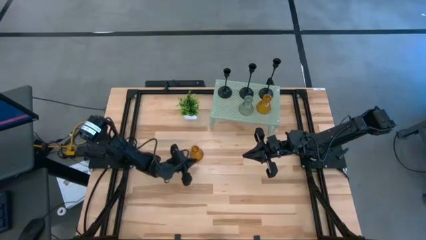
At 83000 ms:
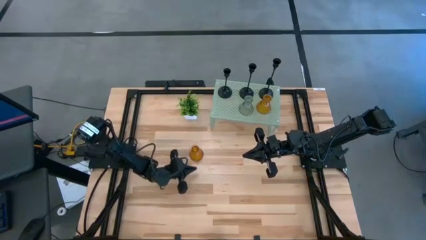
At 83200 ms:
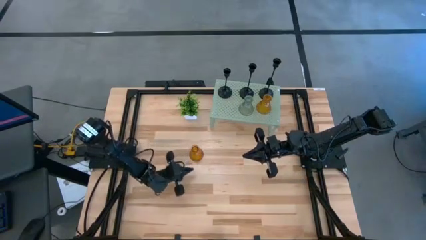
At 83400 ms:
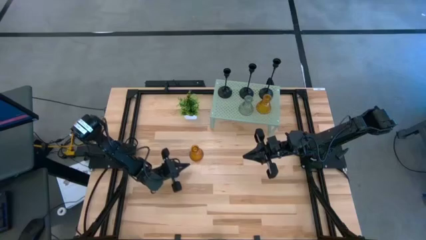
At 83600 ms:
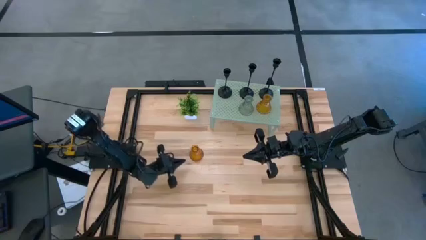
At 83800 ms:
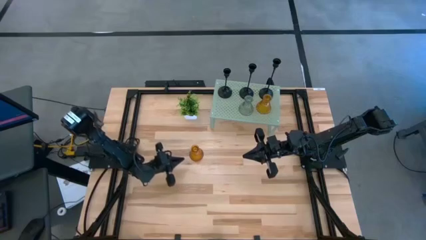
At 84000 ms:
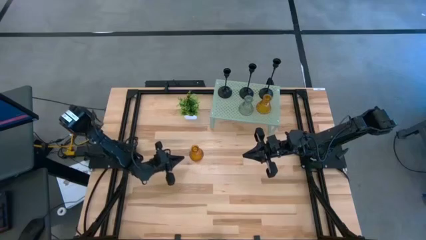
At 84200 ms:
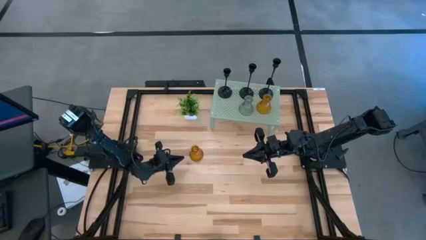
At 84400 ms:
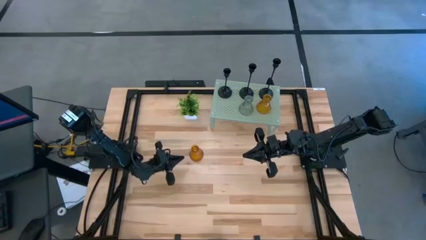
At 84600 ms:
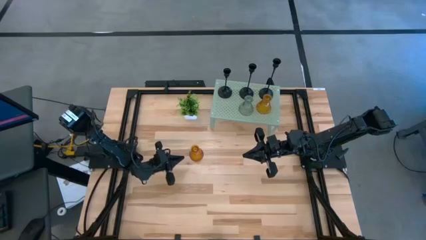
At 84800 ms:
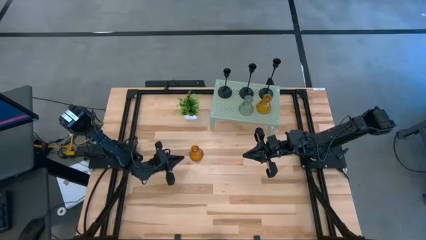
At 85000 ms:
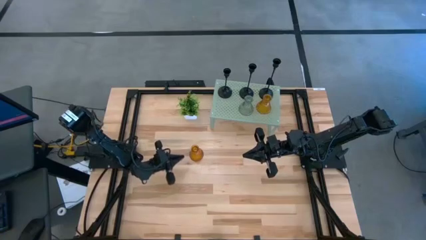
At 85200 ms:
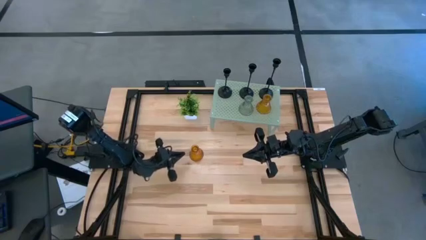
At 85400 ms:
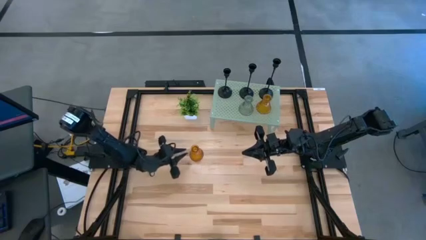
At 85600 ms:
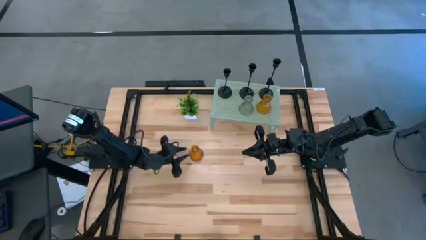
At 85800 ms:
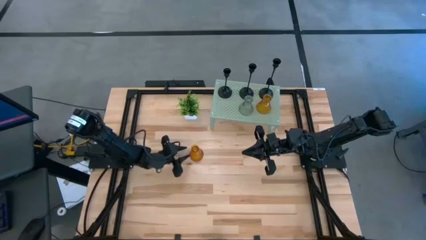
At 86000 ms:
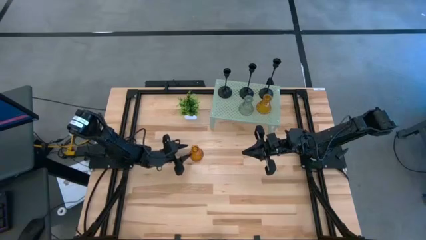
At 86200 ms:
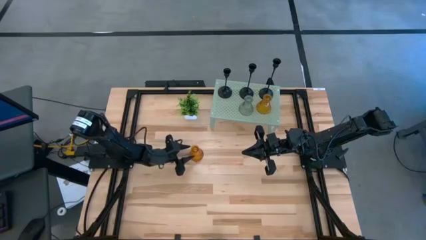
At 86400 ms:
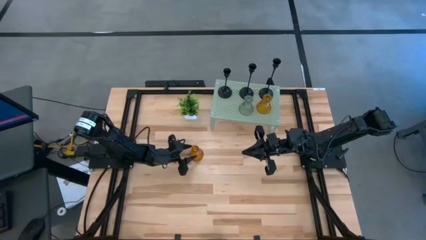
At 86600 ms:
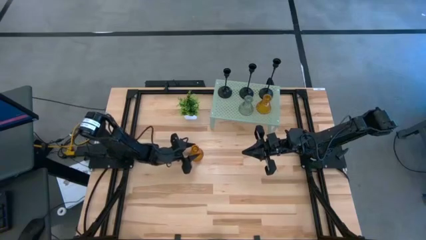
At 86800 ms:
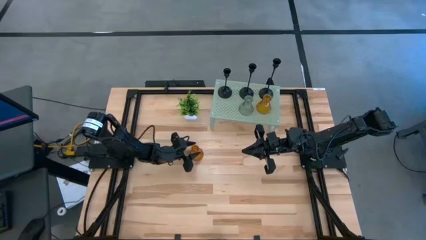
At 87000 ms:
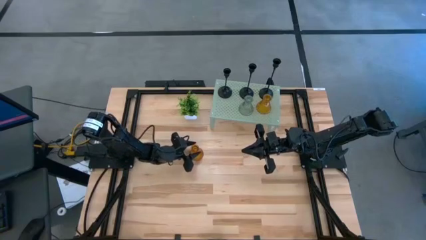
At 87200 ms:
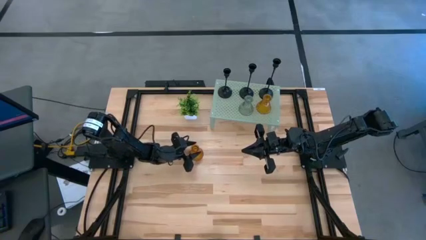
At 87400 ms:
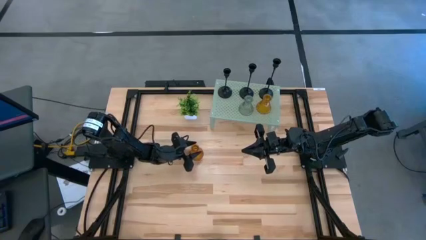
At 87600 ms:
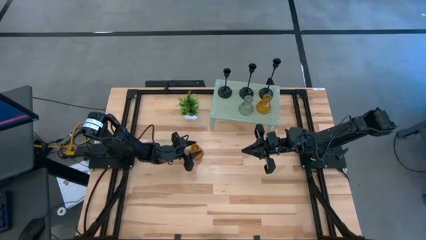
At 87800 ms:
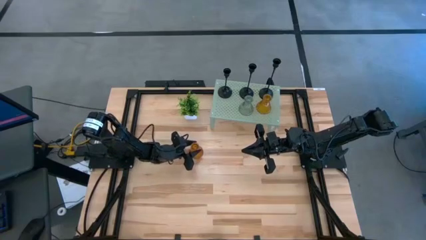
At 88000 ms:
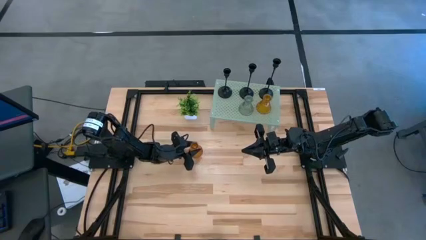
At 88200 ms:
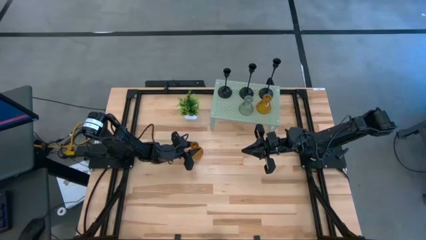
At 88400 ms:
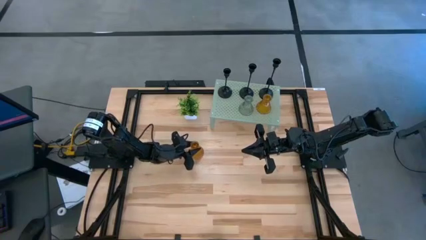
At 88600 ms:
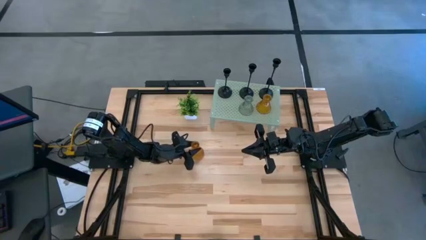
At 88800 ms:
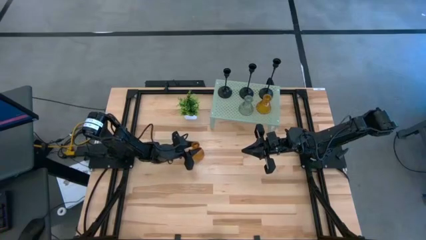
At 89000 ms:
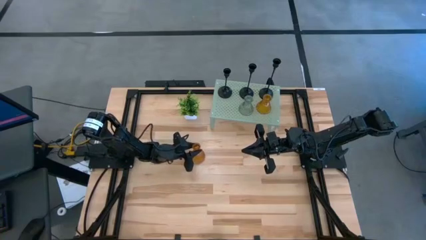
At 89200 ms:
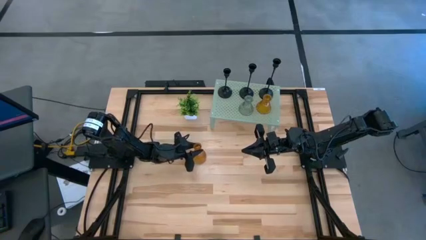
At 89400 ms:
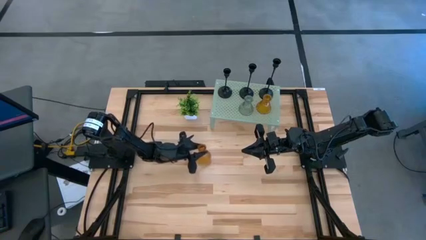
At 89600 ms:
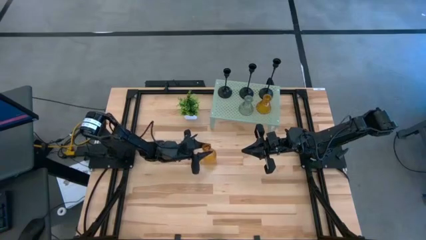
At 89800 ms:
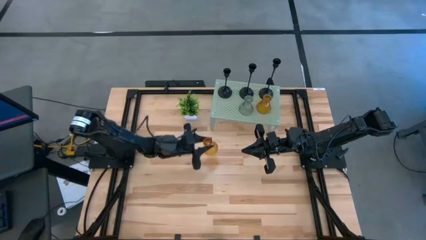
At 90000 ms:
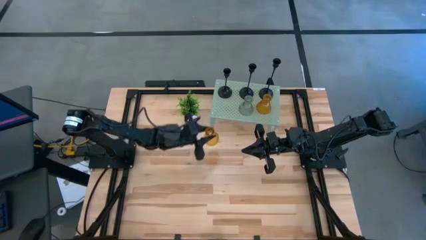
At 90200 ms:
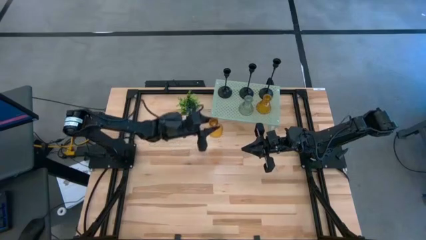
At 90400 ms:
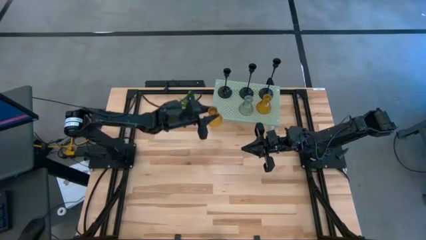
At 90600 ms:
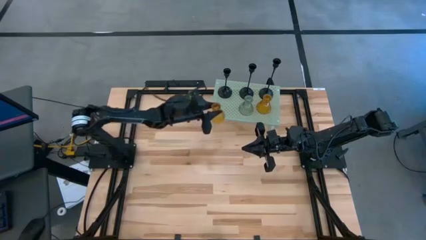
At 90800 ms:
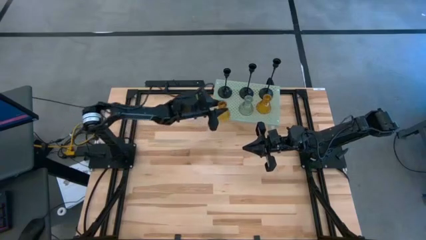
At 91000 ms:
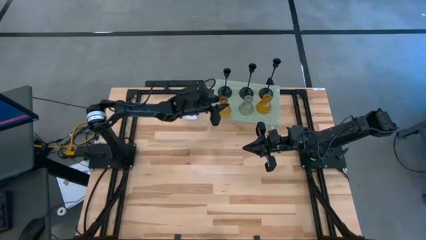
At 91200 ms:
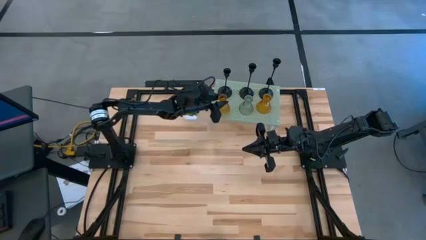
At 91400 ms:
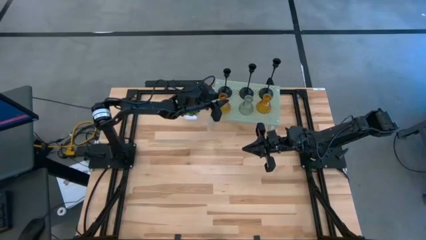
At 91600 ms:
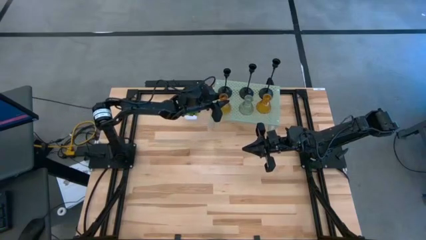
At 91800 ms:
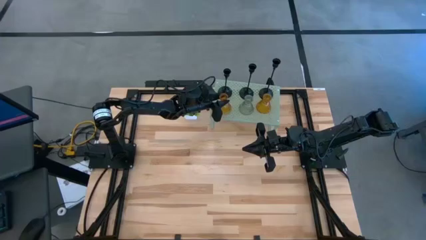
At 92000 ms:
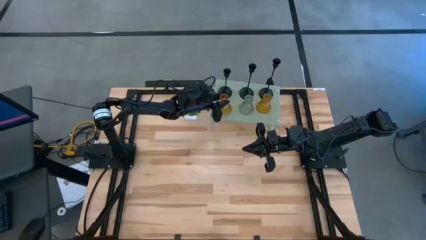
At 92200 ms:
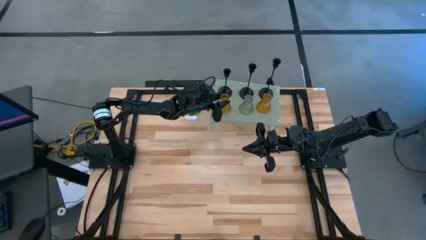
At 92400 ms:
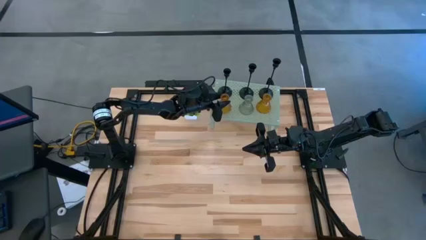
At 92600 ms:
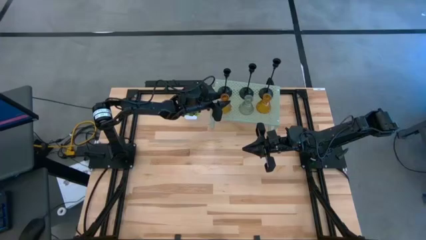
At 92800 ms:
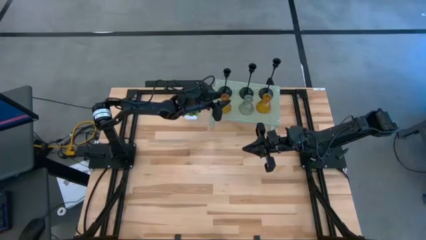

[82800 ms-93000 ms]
Task: Pick & Place candle stick holders
Put the gold glass candle holder on the shelf

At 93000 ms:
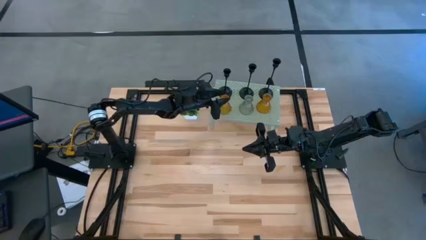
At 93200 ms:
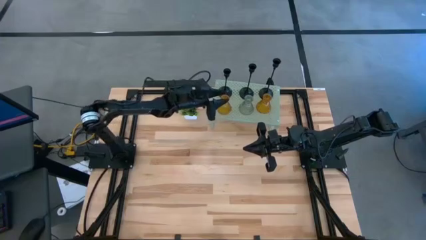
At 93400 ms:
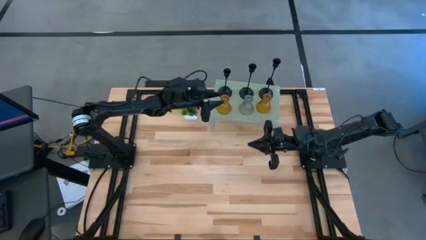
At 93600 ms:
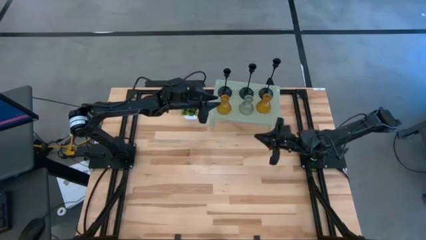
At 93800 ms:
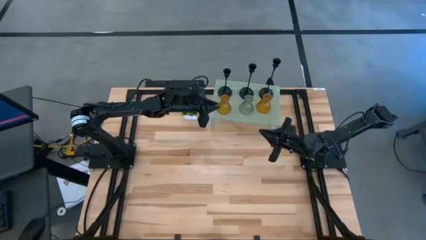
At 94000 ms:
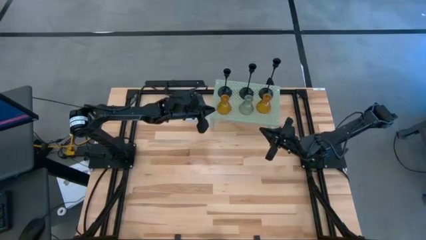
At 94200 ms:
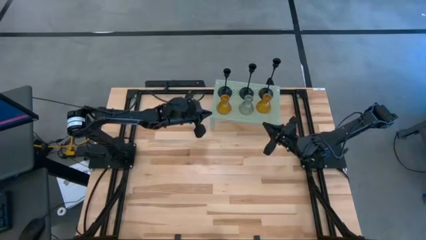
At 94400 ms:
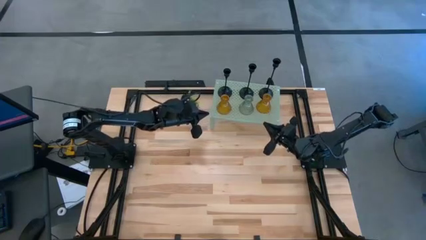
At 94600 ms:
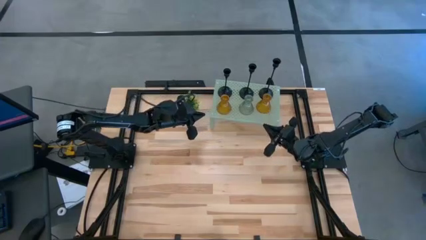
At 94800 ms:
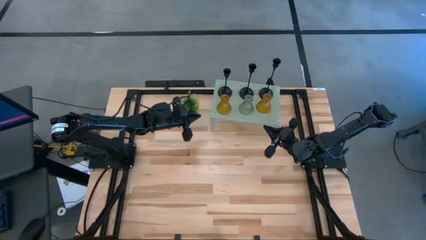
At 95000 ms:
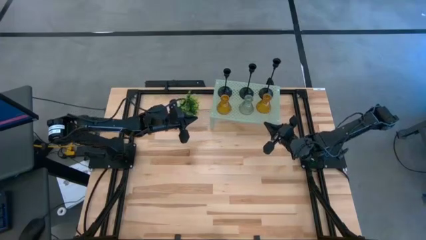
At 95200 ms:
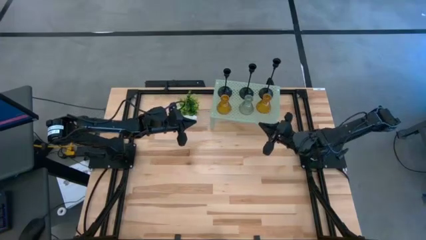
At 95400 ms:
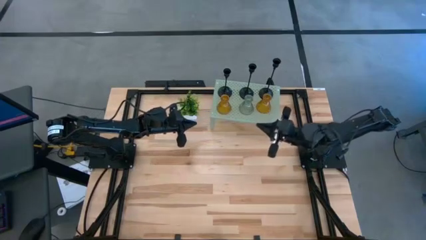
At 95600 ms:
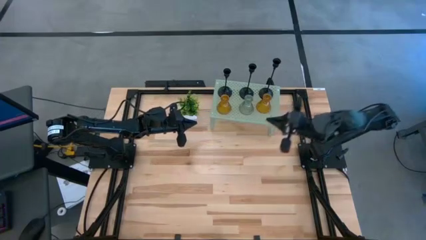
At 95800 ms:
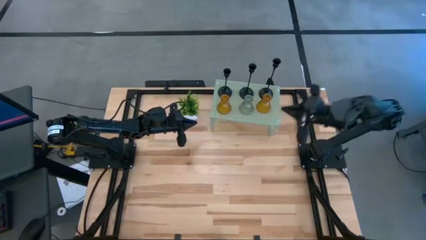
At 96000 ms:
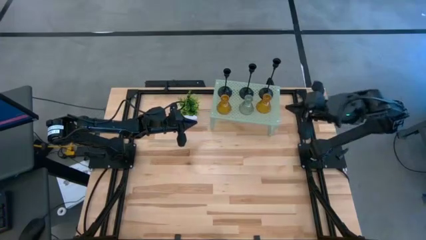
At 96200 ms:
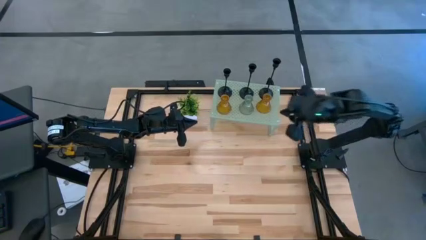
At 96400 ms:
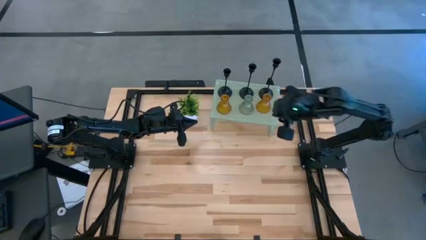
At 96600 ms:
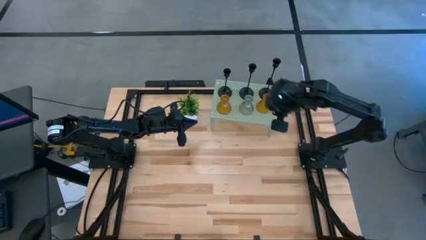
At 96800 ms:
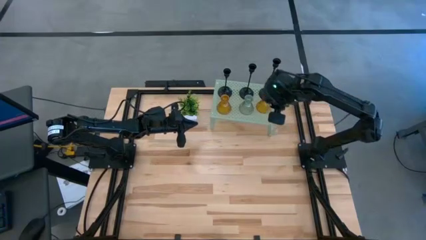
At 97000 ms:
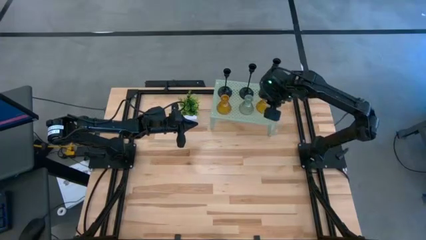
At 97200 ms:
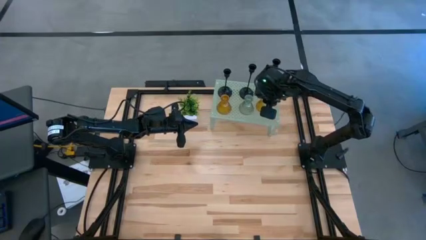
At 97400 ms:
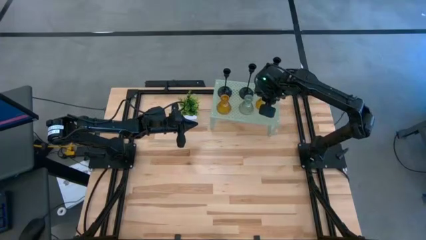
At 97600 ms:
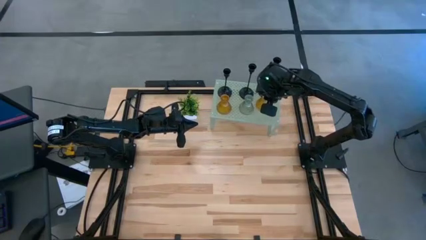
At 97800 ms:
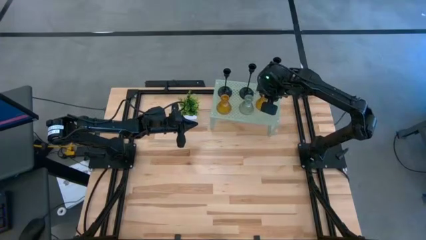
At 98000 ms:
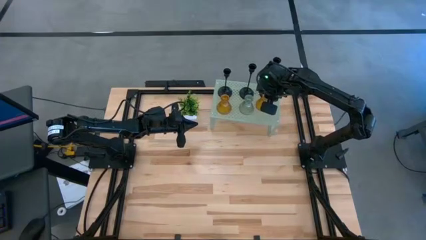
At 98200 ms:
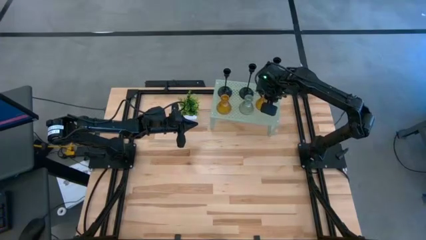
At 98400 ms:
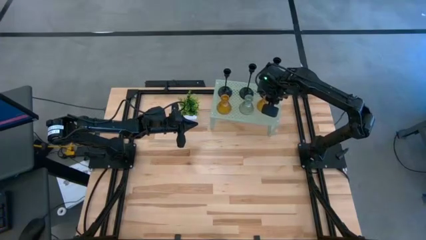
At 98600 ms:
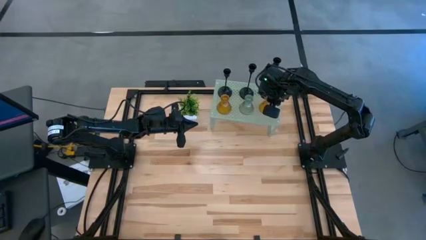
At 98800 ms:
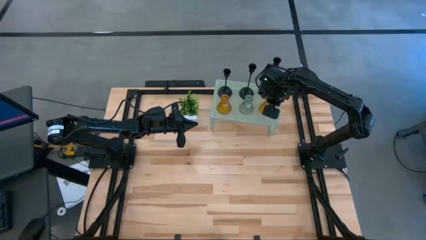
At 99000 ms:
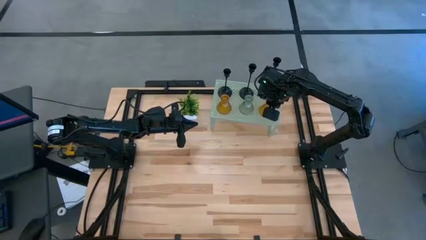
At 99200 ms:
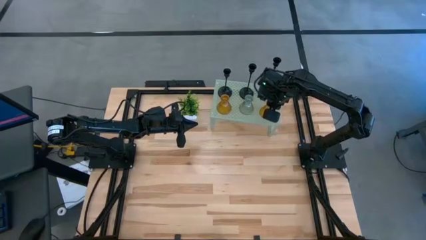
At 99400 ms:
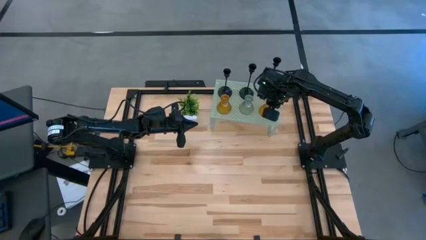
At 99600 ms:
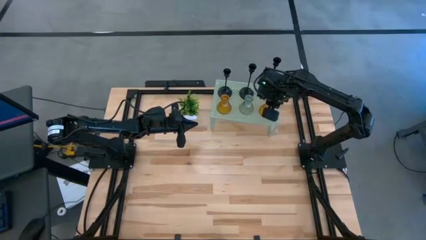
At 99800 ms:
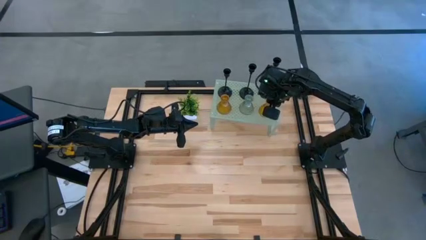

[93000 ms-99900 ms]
Adjust the gold glass candle holder on the shelf
